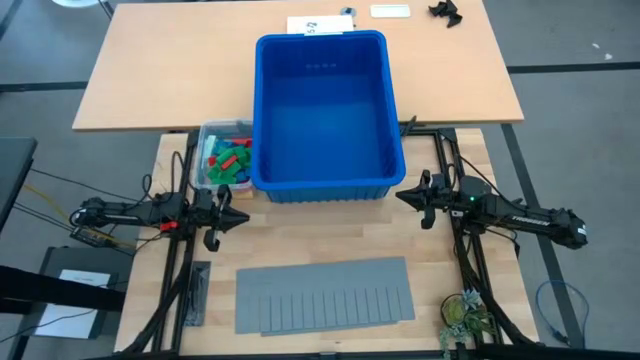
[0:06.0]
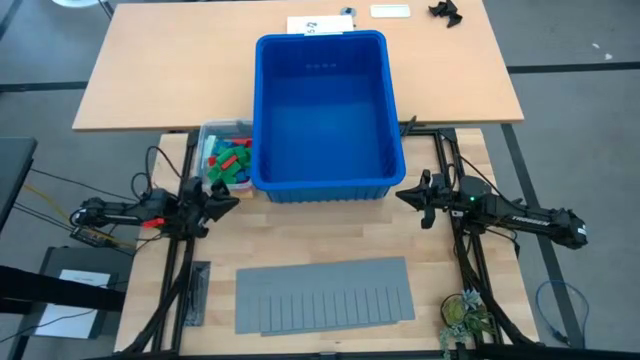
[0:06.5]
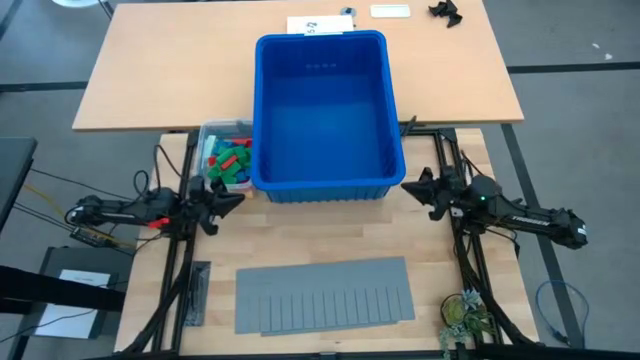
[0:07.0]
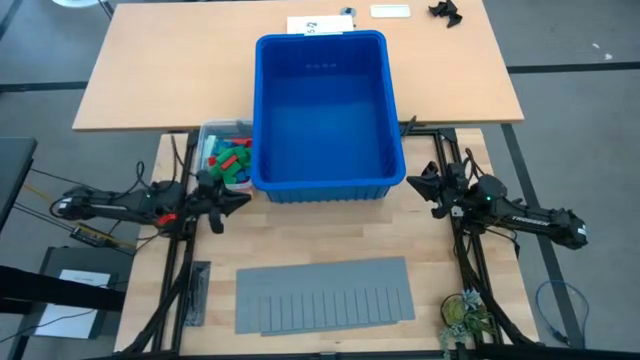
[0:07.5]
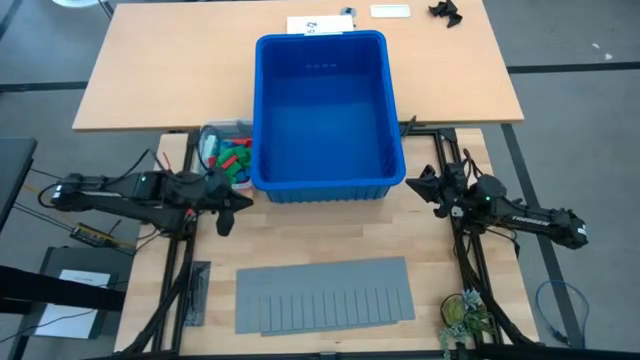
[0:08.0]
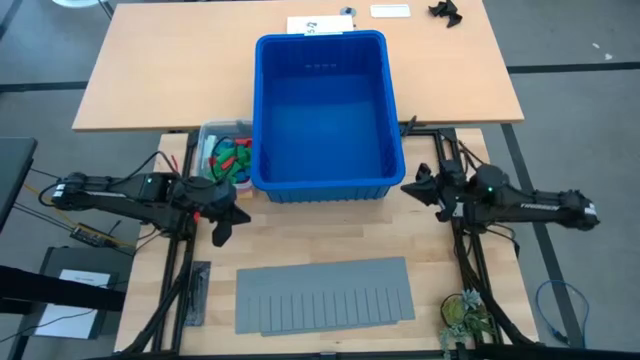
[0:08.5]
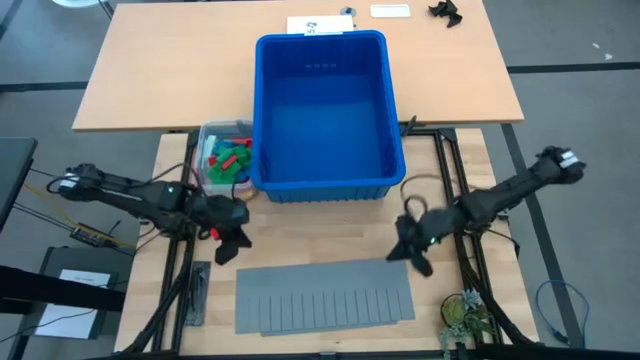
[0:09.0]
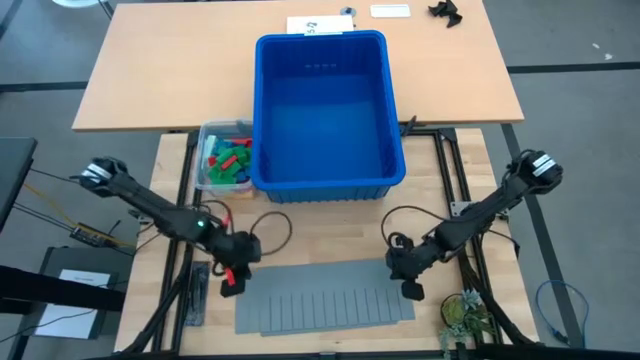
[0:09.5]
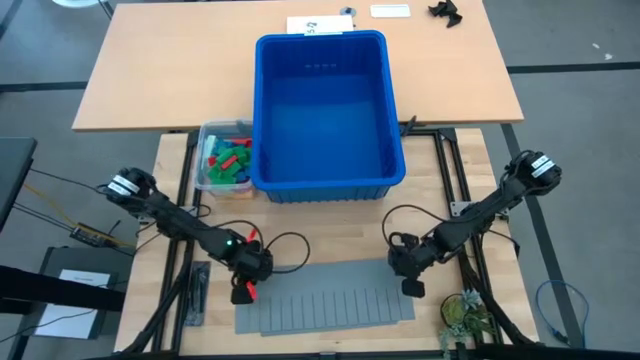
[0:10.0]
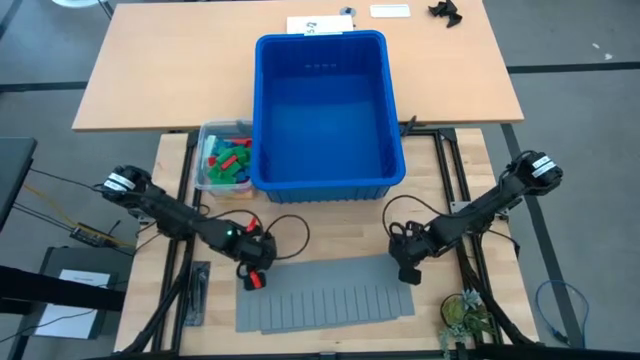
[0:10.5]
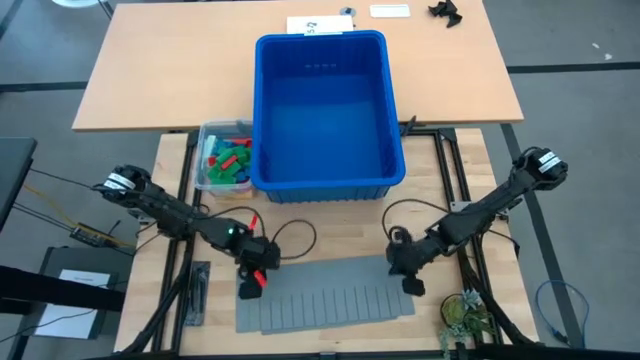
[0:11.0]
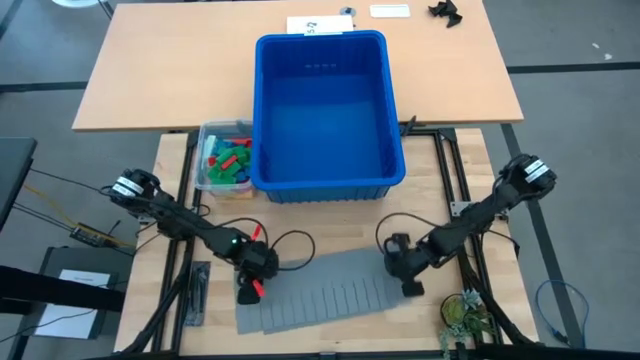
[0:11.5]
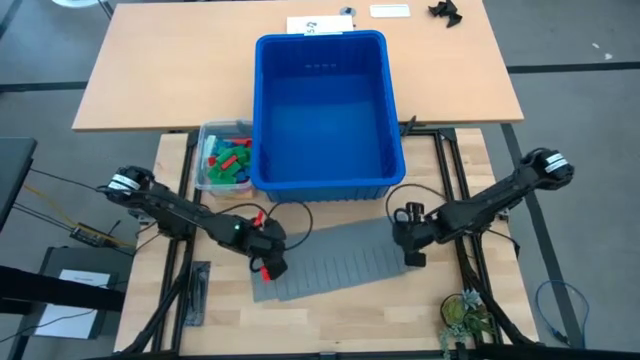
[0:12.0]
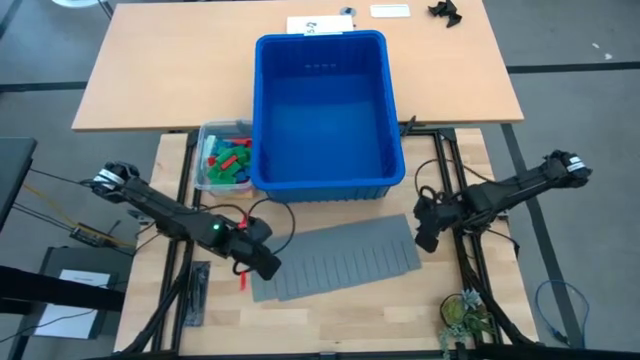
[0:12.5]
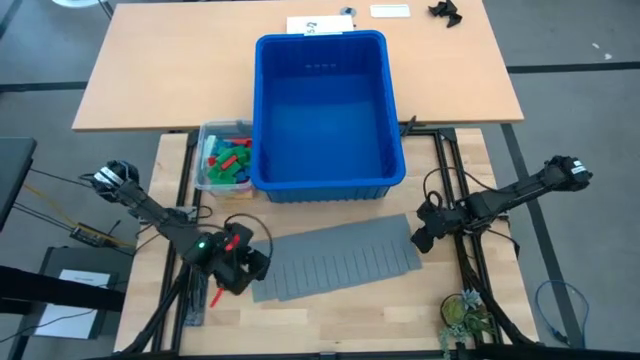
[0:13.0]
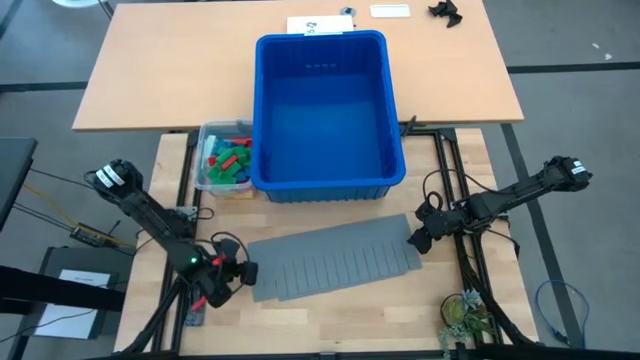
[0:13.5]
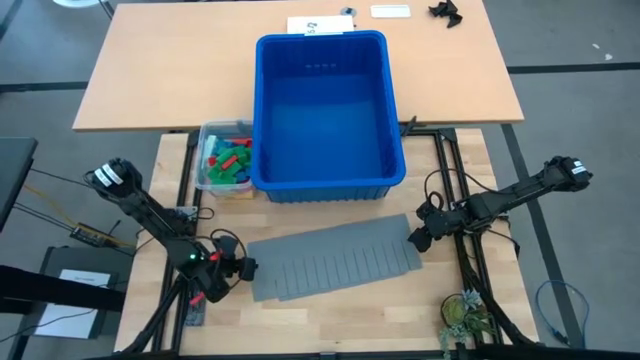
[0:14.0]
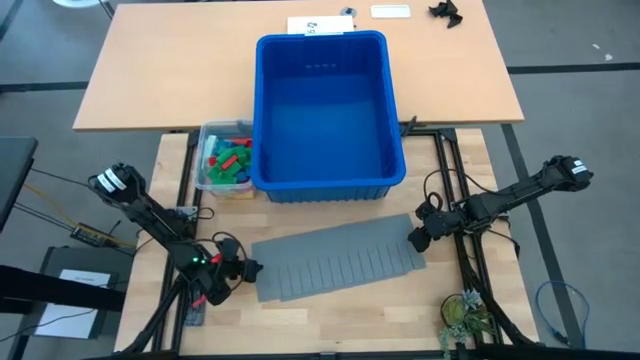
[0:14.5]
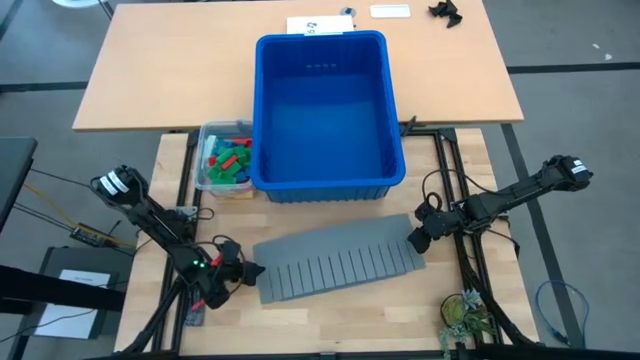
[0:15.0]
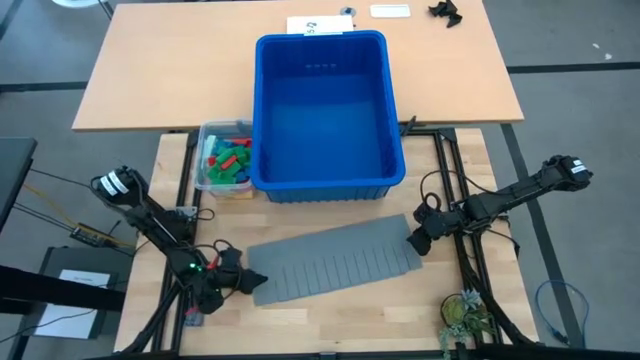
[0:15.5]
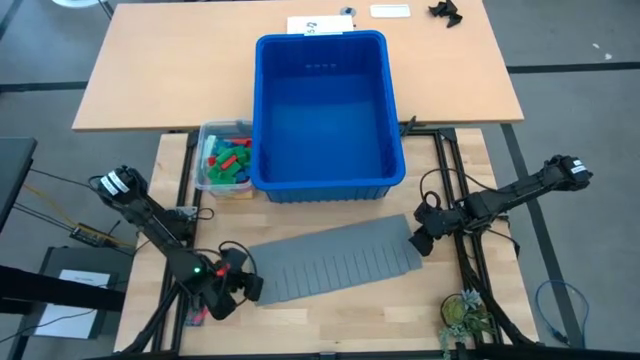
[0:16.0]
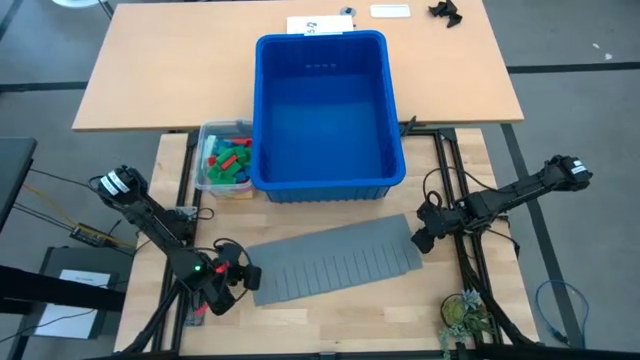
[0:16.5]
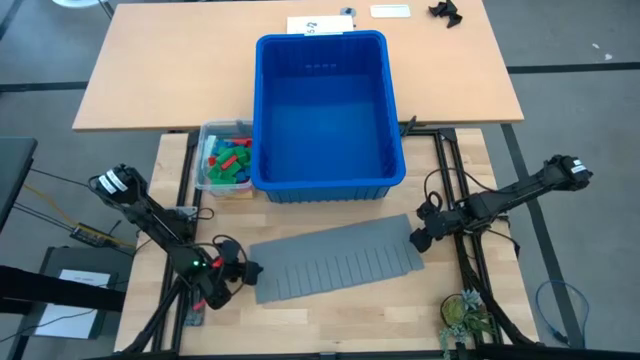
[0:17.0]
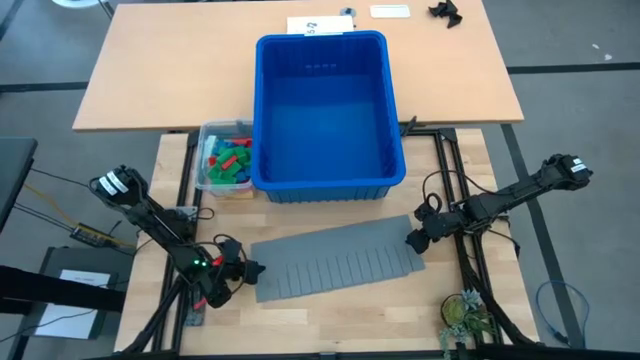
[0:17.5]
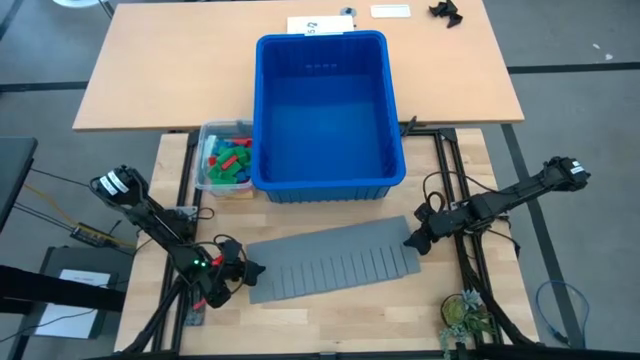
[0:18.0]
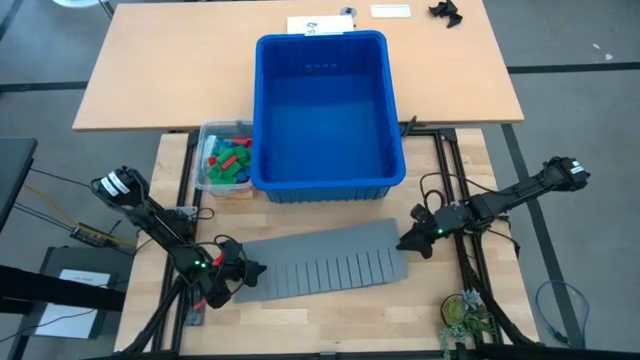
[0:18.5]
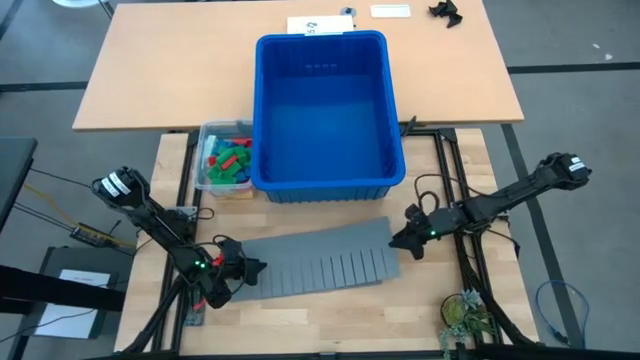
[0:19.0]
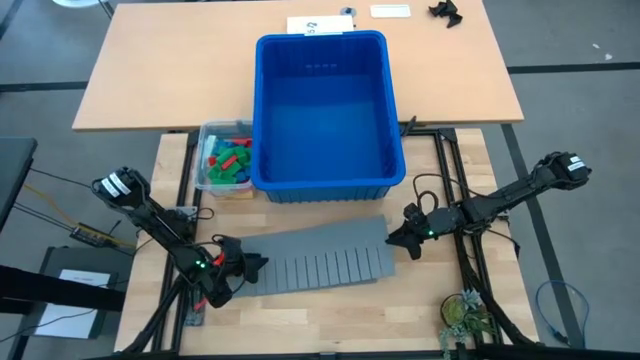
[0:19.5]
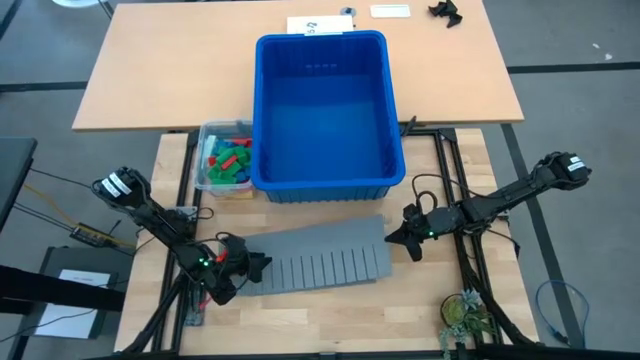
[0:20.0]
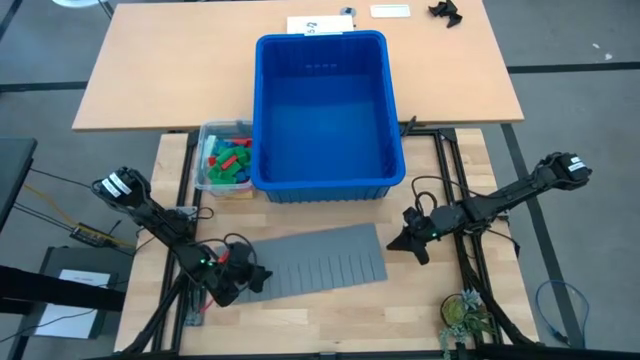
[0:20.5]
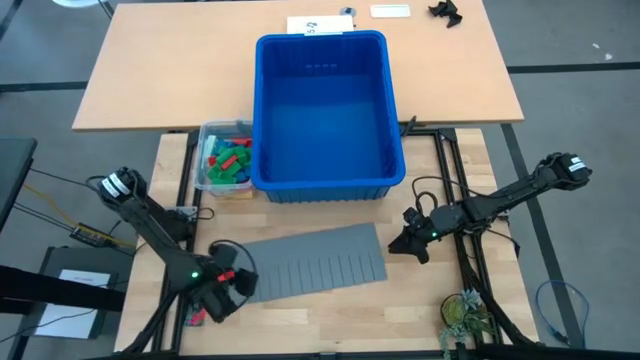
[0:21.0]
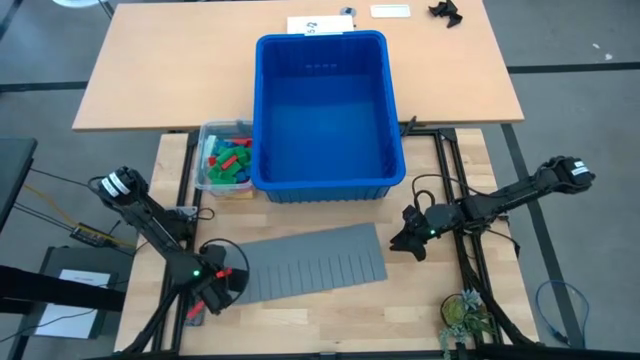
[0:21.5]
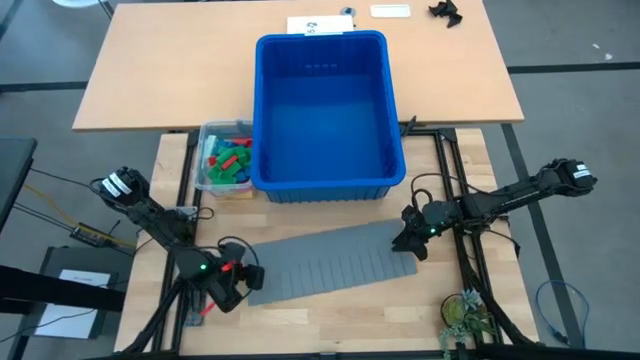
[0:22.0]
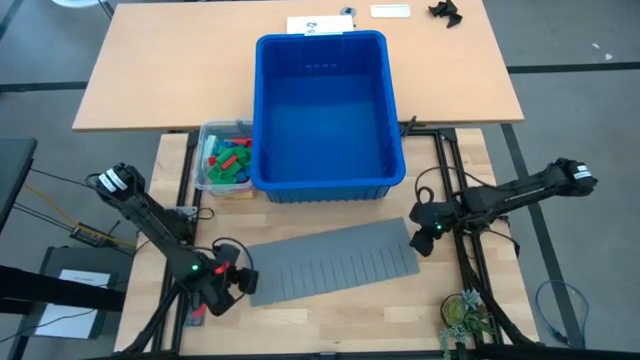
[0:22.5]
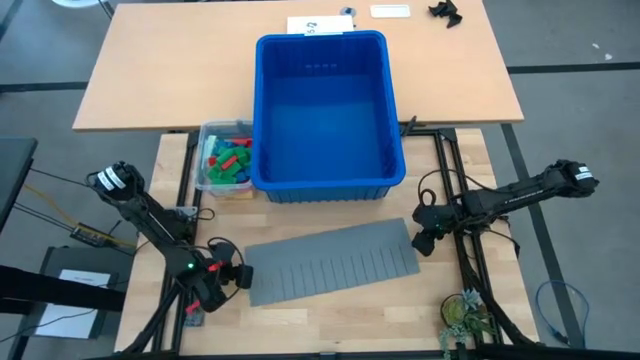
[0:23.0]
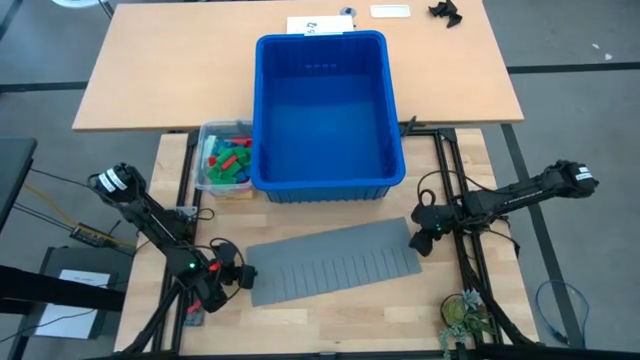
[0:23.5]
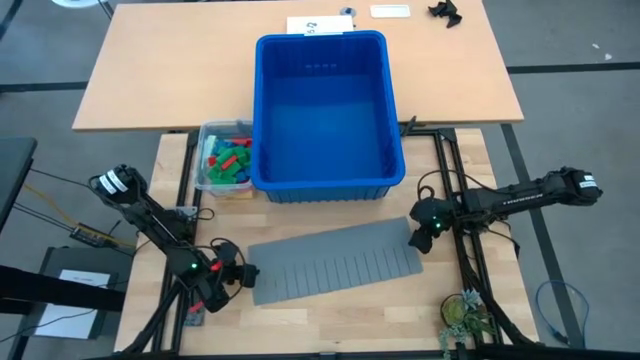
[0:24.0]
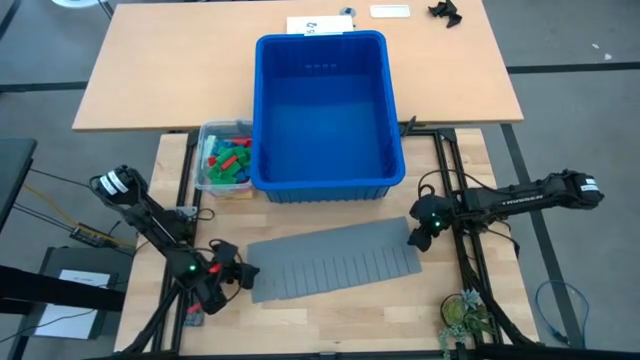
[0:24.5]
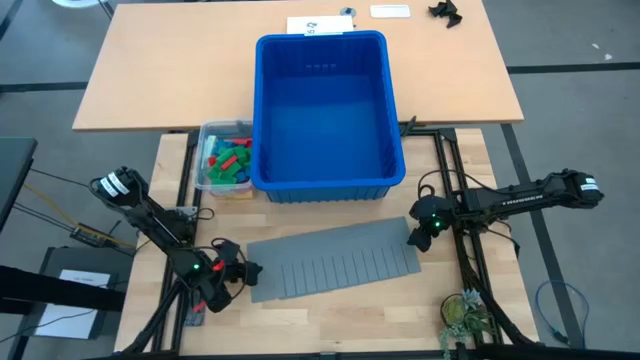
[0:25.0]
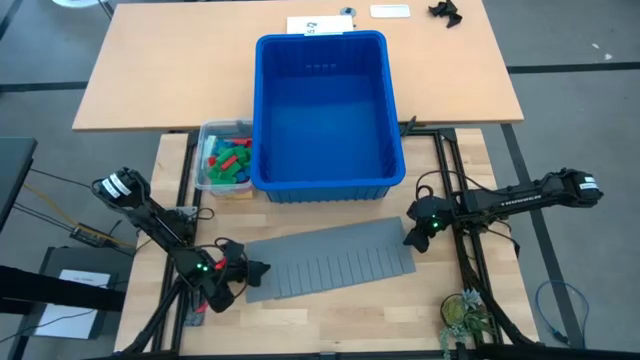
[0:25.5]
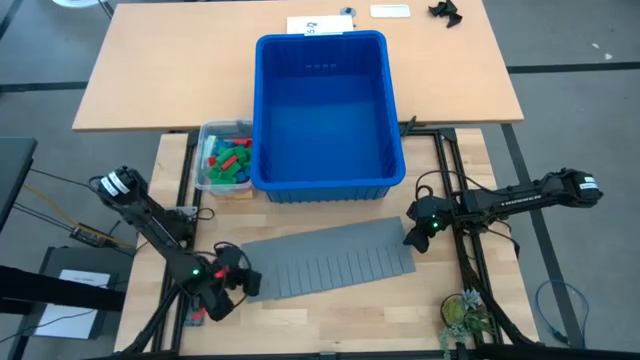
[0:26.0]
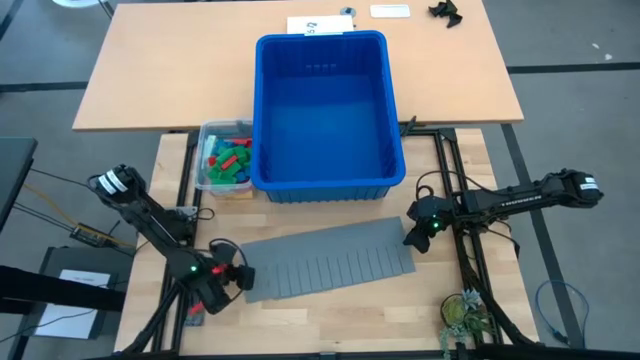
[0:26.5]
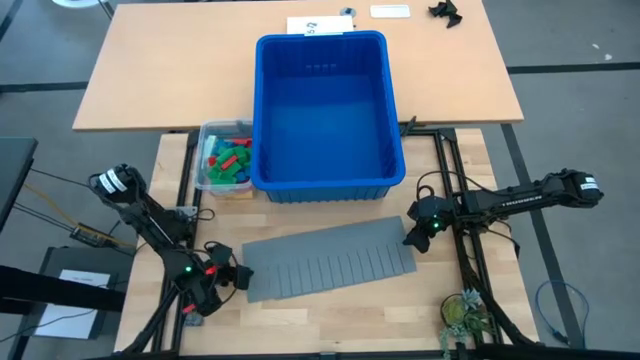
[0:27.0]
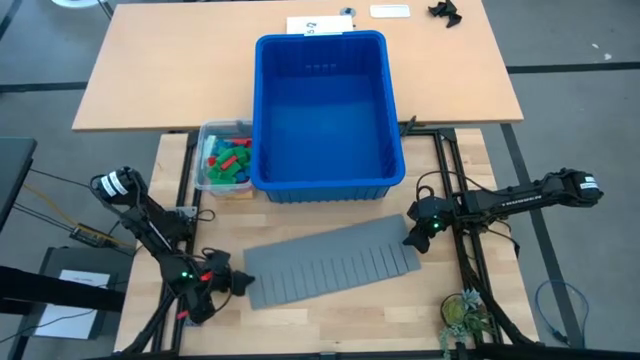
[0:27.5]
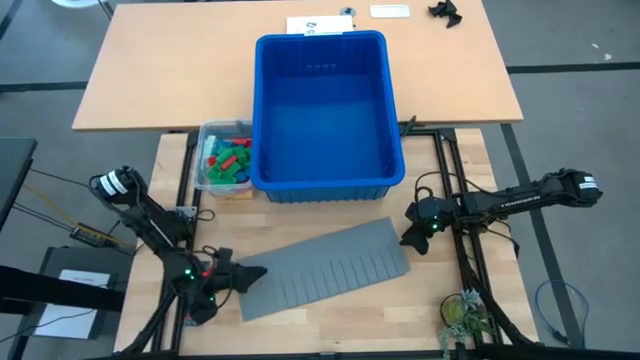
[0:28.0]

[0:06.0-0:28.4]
Task: Sort blocks
Assemble the blue bin using bin divider
